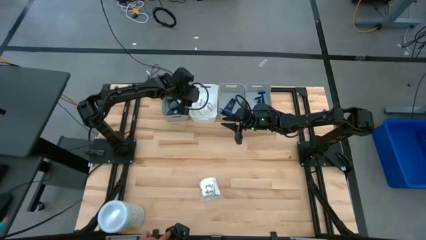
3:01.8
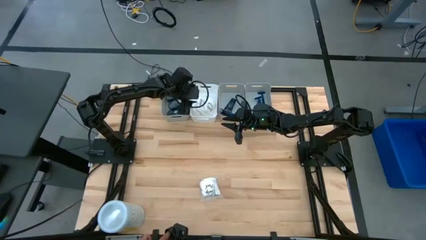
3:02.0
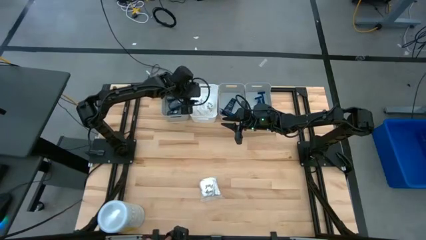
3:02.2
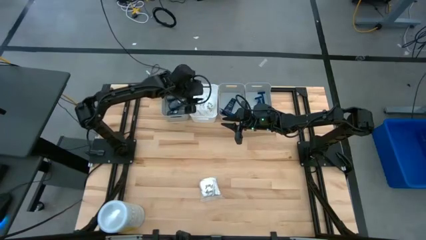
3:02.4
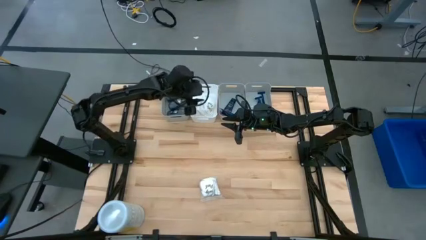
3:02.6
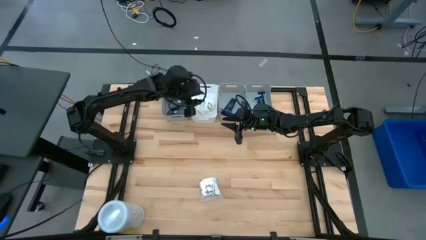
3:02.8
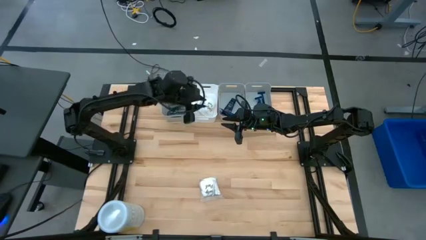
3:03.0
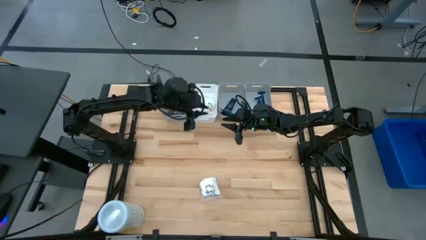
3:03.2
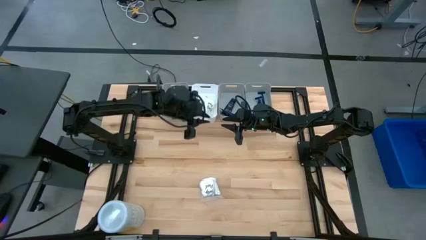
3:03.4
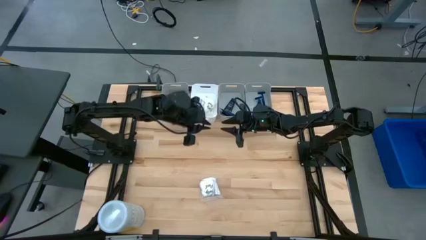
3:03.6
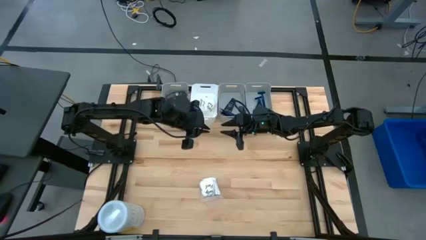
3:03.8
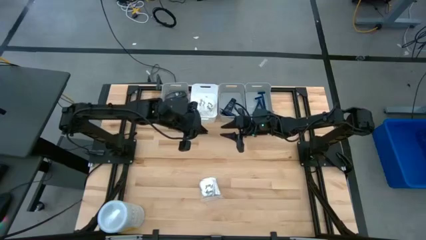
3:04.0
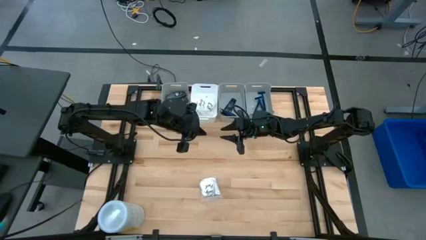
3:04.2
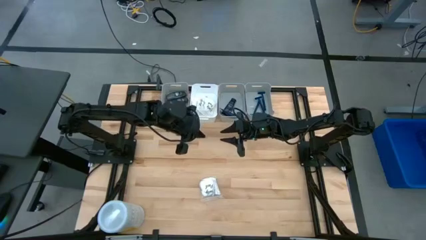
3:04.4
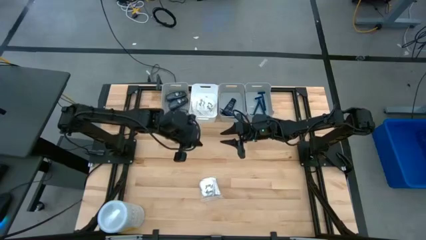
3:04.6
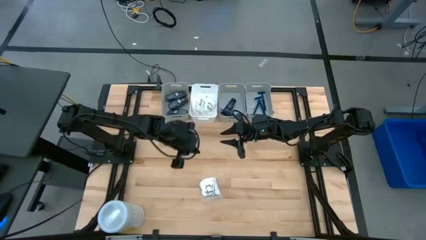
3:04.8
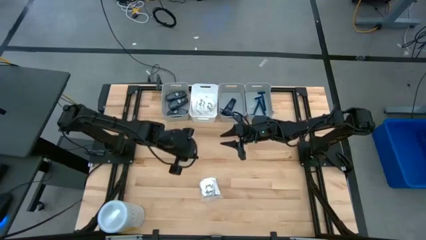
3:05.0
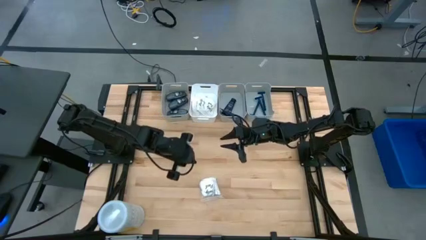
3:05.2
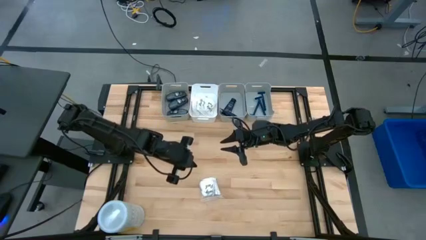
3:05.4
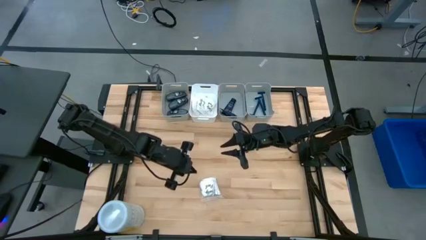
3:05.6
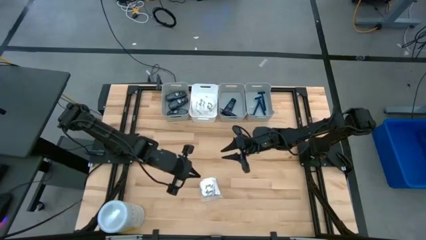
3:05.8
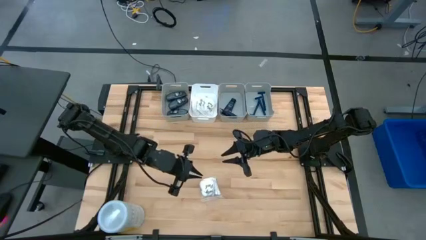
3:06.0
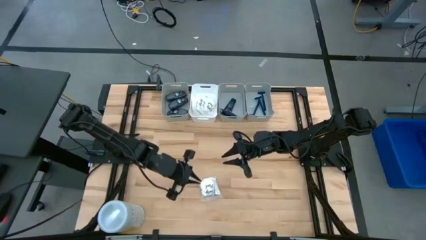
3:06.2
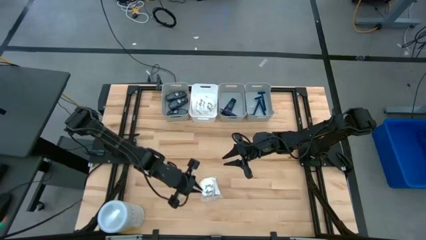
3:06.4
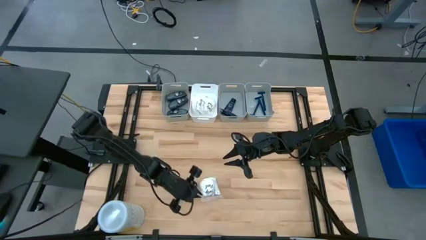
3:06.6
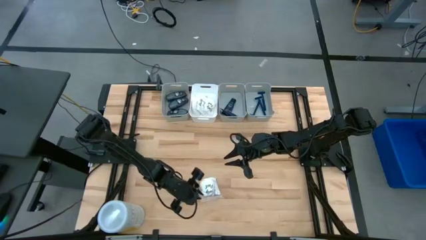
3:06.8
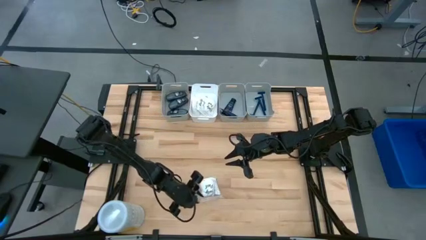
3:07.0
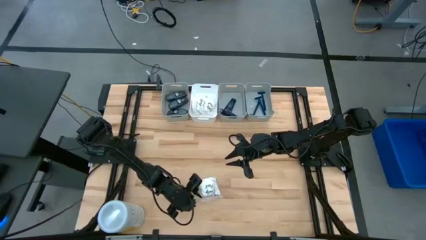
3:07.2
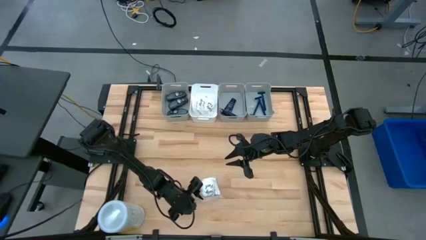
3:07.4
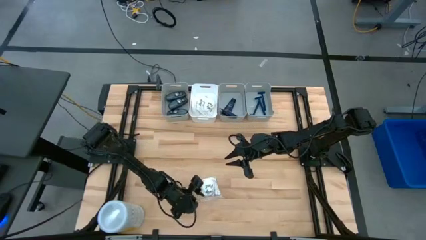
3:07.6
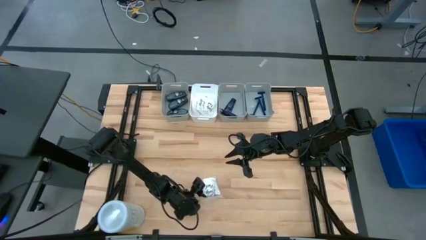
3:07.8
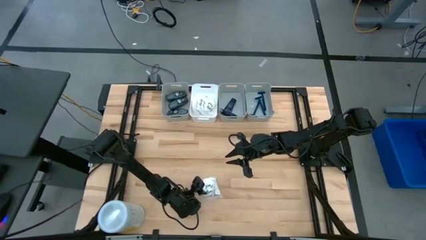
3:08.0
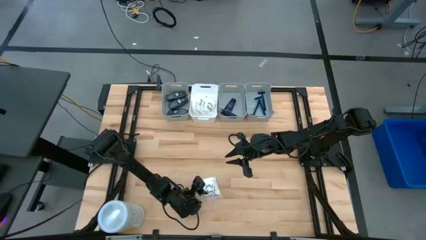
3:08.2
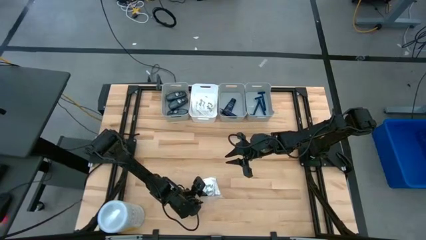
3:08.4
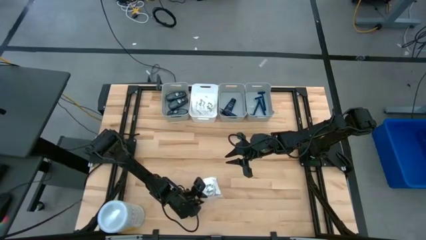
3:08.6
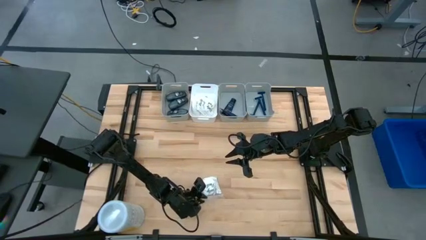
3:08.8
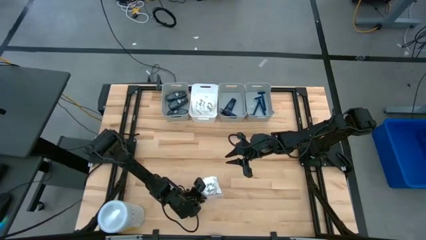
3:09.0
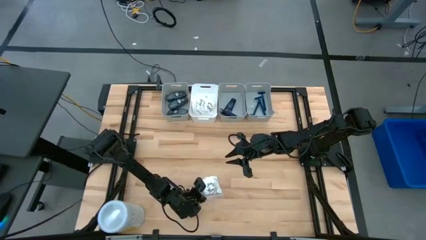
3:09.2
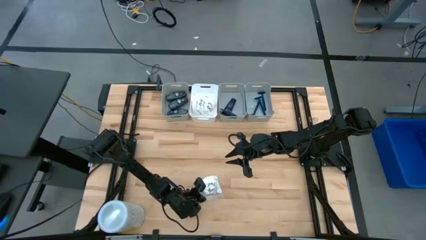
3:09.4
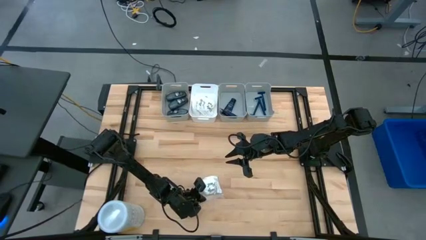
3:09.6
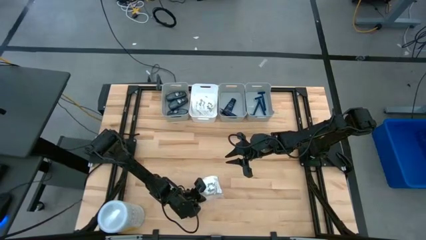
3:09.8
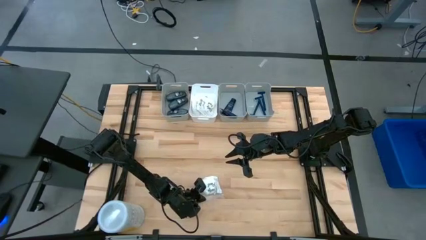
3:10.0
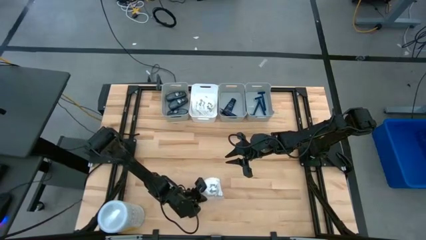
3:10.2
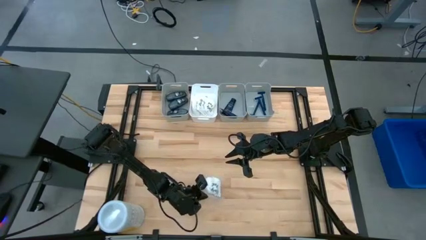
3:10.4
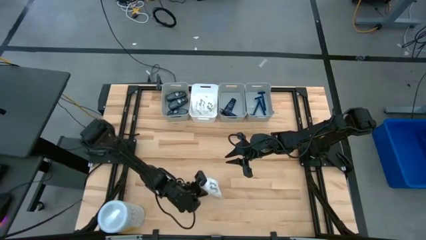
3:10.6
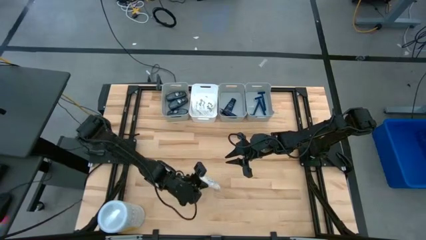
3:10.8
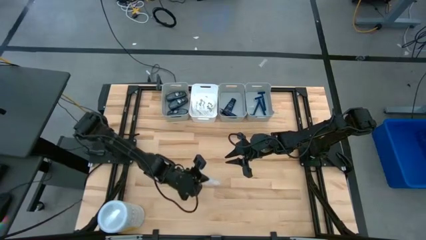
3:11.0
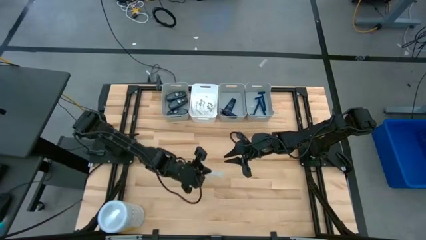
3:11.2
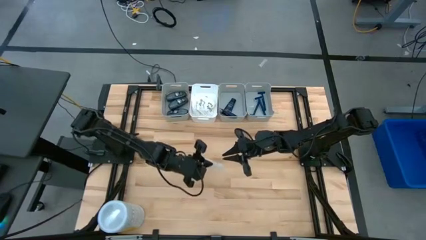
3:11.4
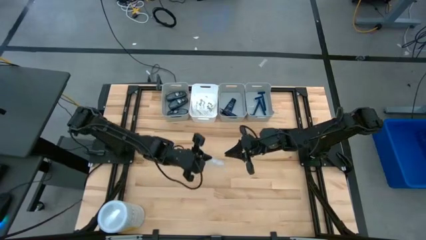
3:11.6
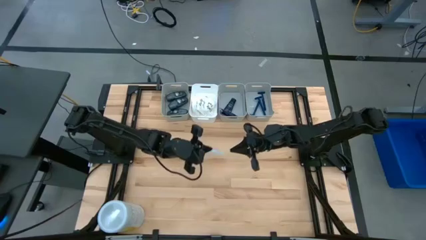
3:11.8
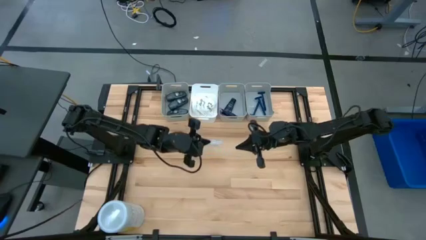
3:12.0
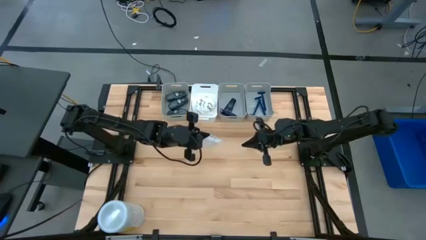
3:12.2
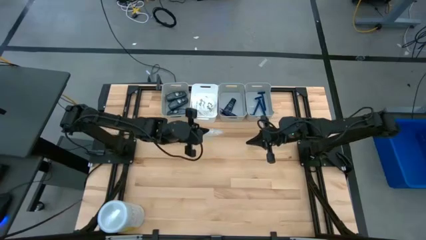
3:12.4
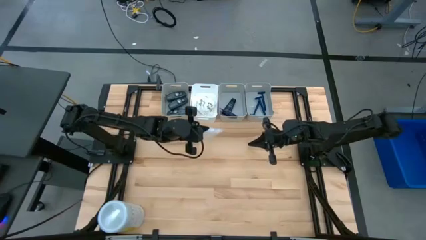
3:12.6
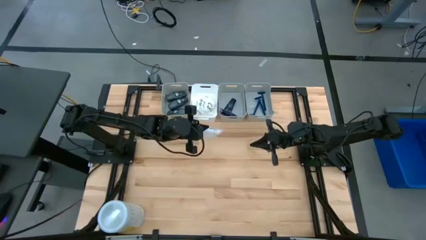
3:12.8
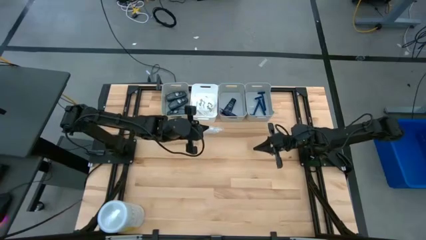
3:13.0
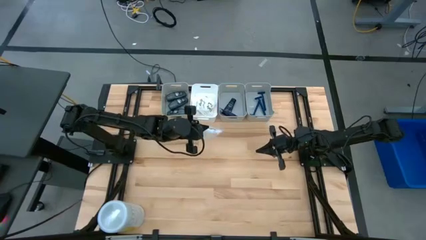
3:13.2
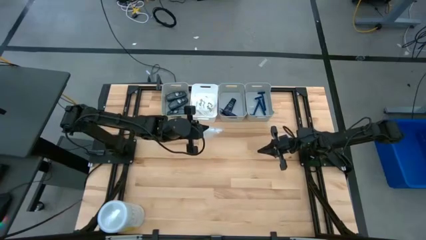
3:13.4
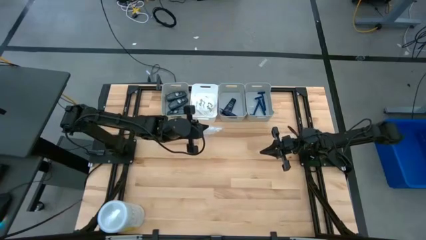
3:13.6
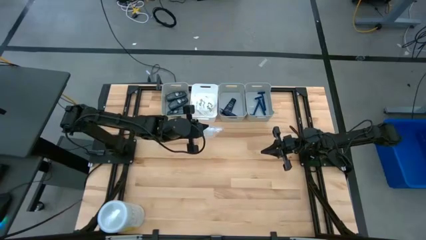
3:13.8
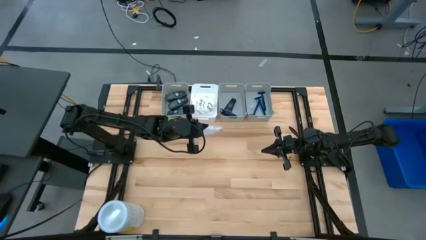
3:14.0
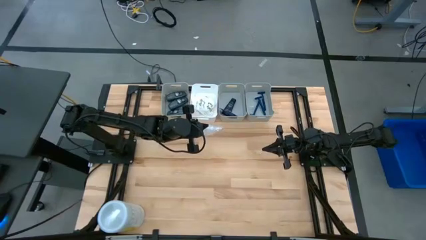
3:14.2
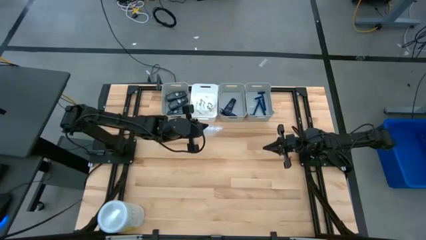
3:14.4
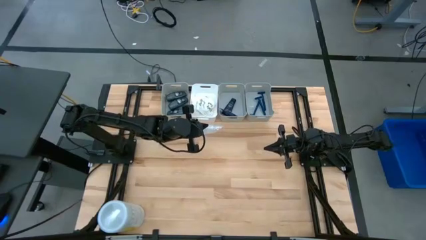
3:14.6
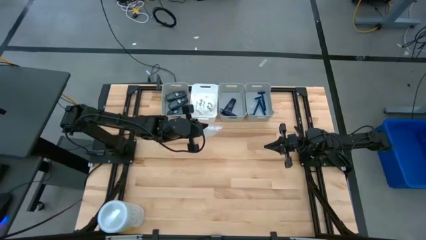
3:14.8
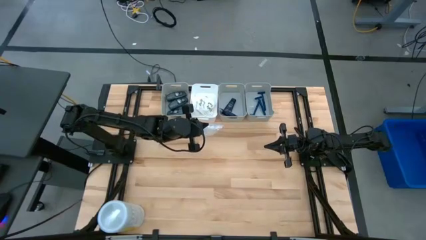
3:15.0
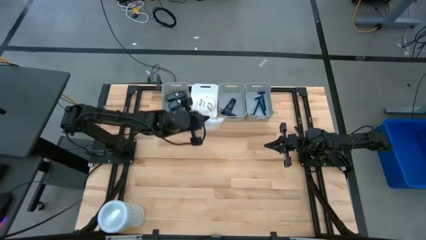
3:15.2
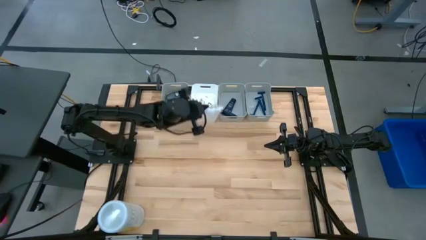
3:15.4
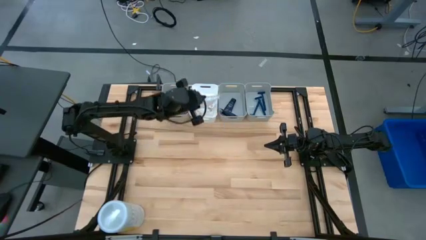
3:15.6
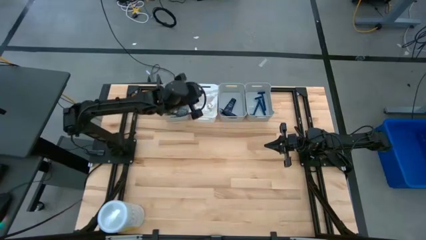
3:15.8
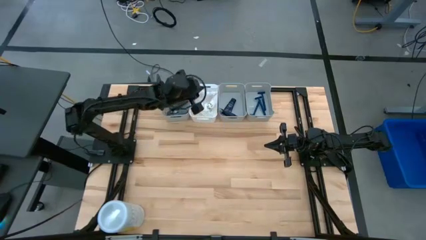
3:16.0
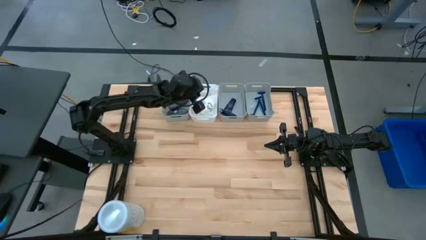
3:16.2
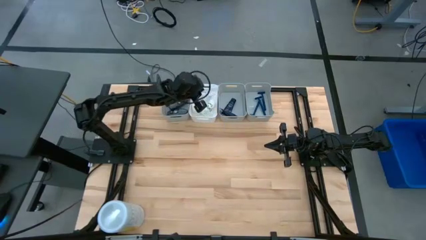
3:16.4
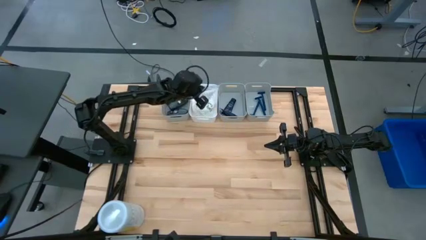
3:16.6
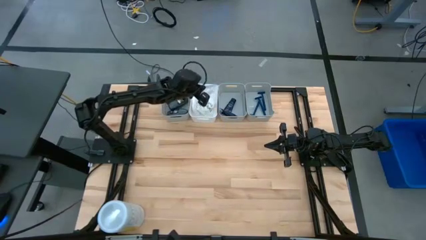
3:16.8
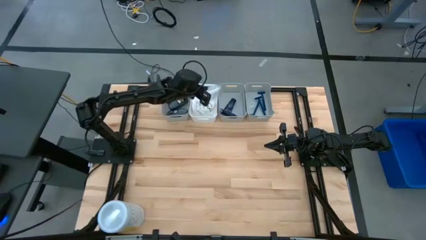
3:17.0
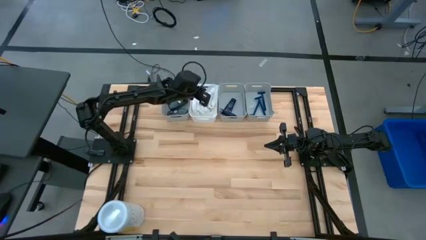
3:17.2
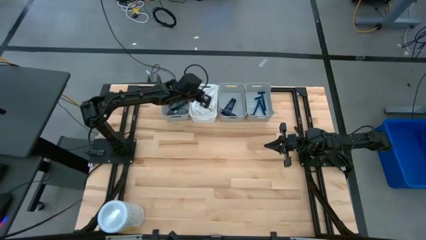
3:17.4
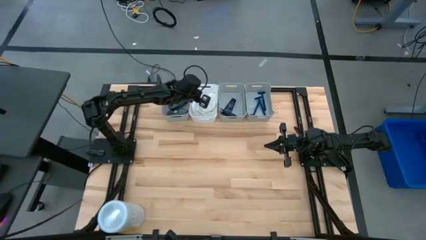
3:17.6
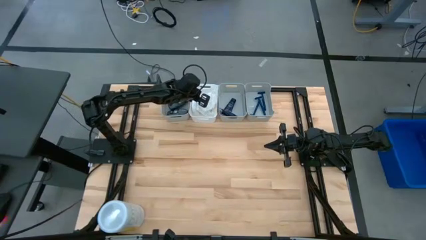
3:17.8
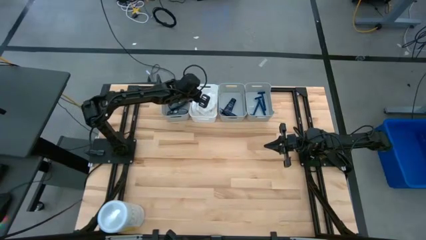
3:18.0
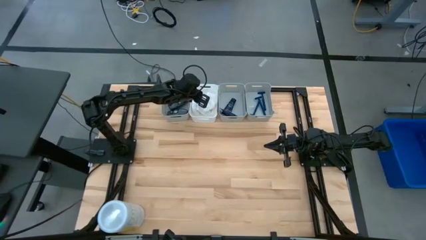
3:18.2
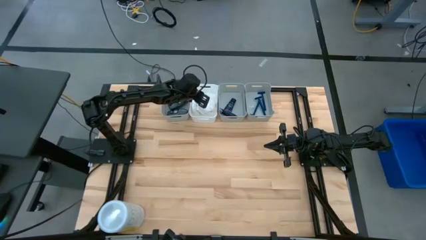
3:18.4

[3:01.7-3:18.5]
Task: Pick & Place Travel size toiletries
Put the white cotton pack into the white bin
